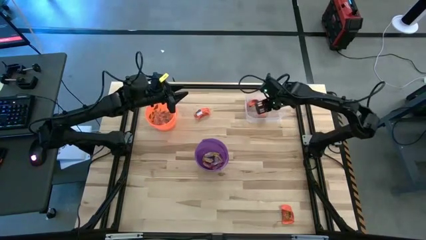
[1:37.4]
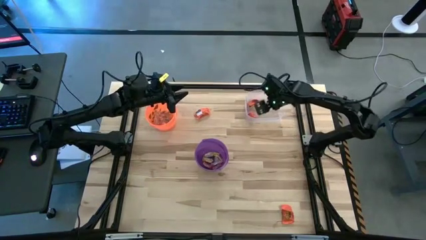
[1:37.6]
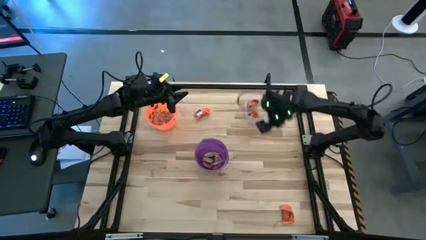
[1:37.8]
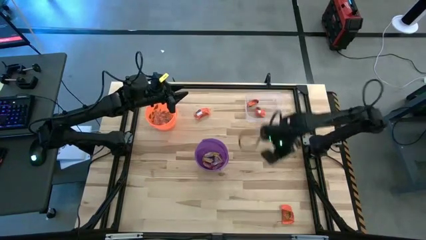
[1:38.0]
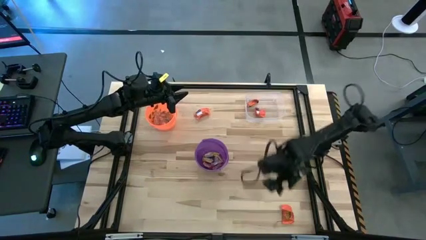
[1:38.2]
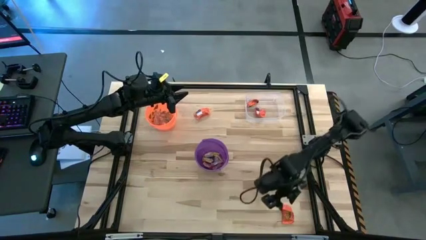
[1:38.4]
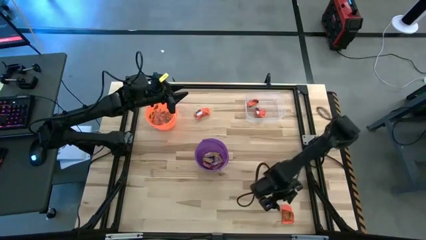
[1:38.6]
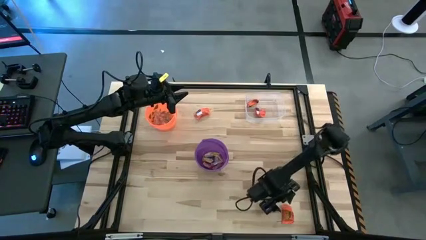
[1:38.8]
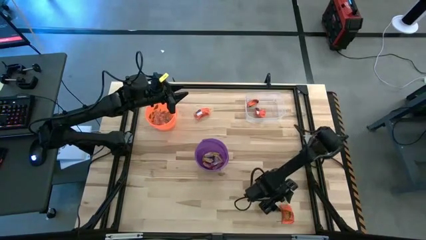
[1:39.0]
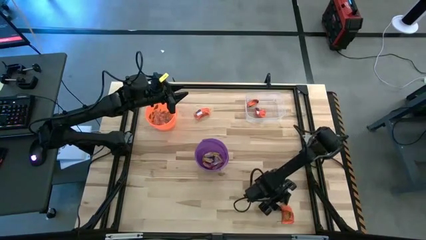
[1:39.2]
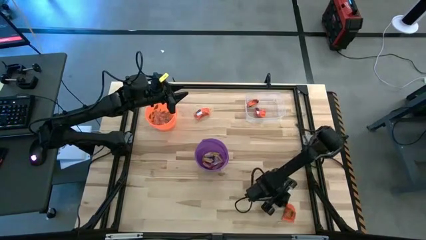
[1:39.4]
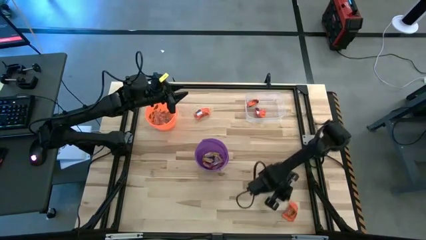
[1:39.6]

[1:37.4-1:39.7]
Task: Sort candy by brand, put in halloween buckets
Put the orange chocolate into the transparent bin

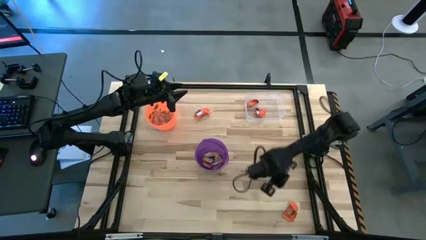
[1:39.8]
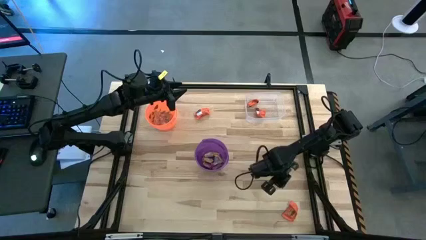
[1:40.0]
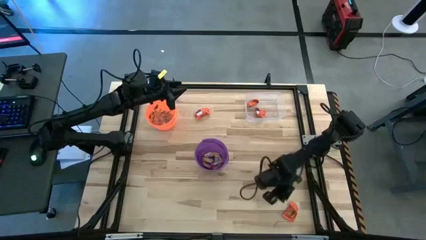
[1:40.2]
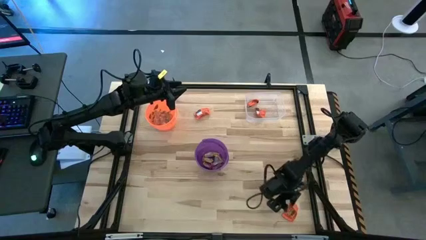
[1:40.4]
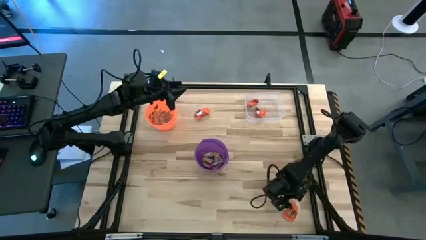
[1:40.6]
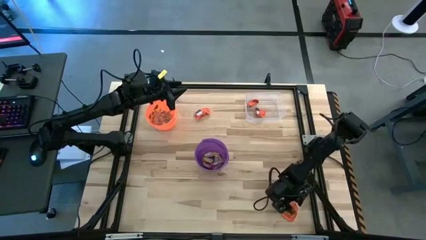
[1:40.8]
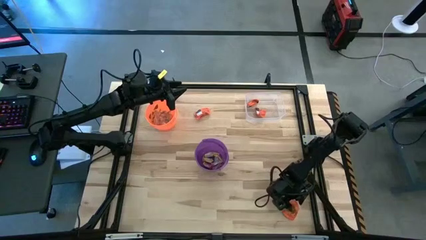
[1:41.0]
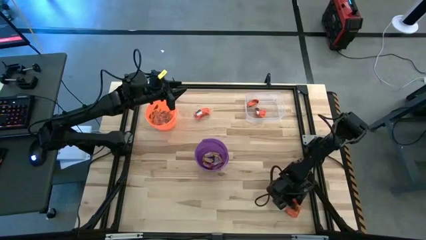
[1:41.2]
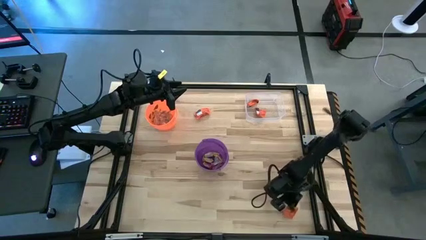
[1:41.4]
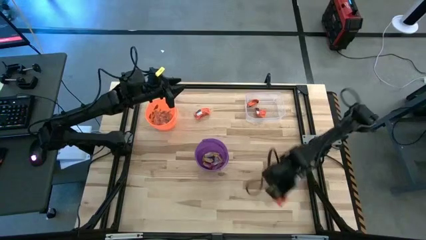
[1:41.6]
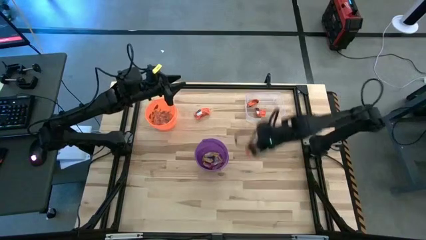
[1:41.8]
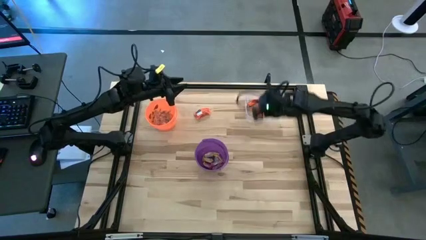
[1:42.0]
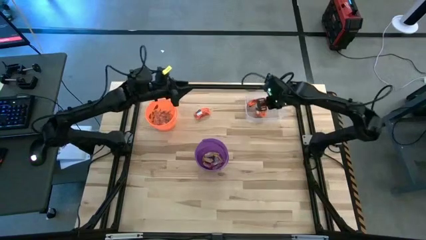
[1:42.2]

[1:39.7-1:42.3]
Put the orange chocolate into the transparent bin

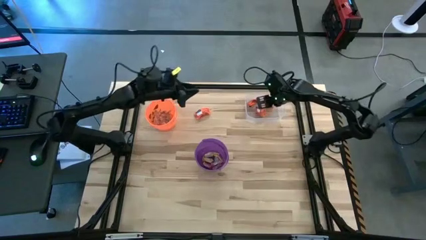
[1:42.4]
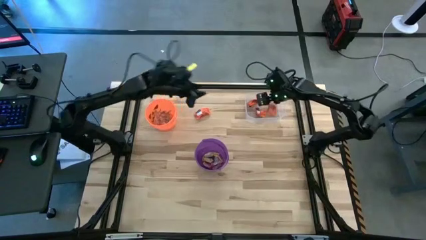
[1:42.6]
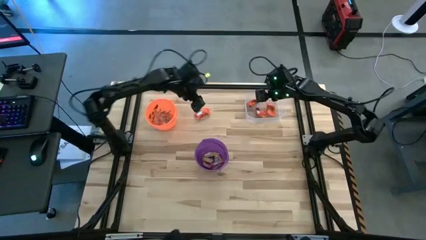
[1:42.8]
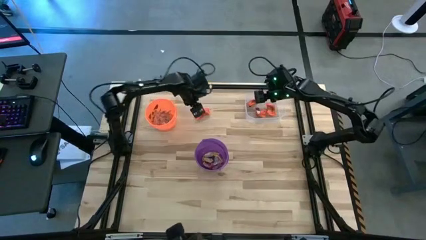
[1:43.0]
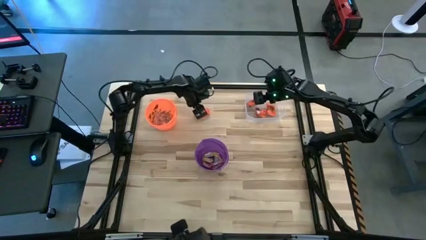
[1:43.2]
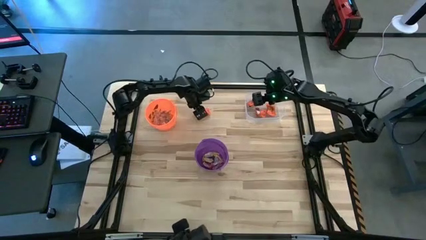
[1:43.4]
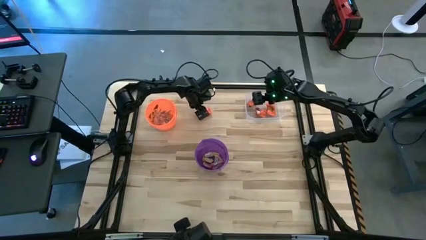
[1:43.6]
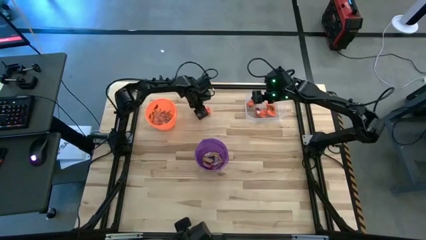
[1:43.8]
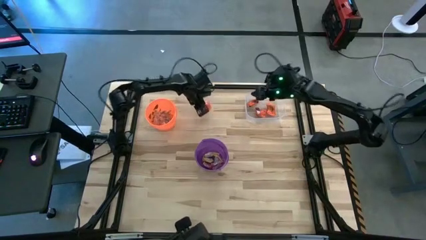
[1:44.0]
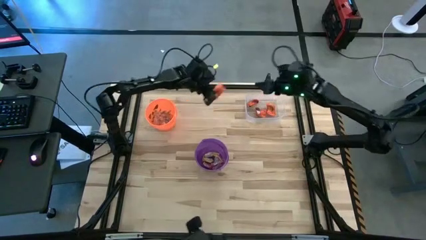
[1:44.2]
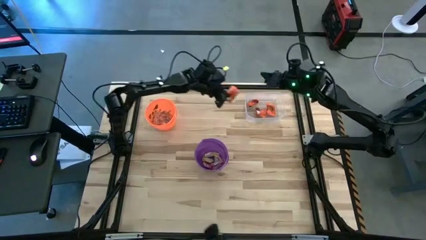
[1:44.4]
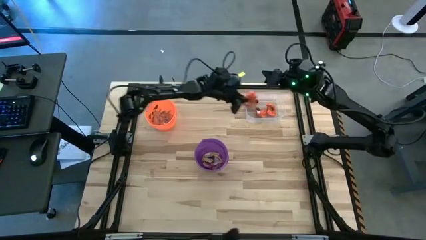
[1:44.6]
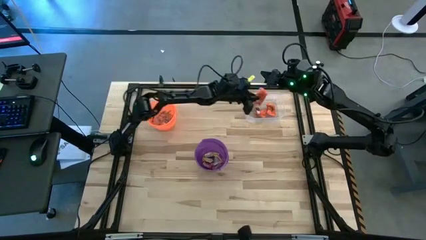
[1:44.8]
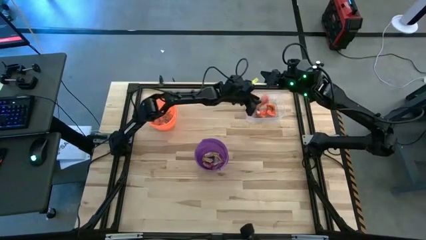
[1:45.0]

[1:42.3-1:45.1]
Put the orange chocolate into the transparent bin

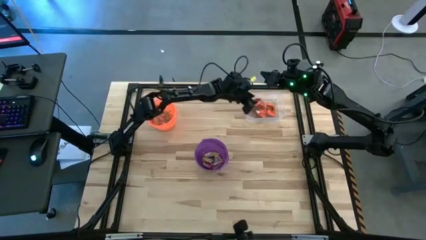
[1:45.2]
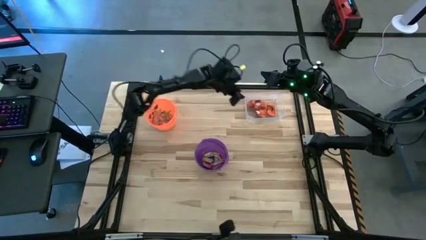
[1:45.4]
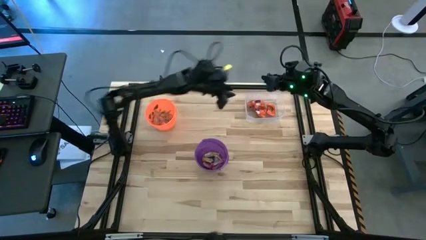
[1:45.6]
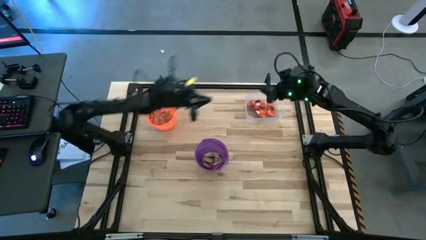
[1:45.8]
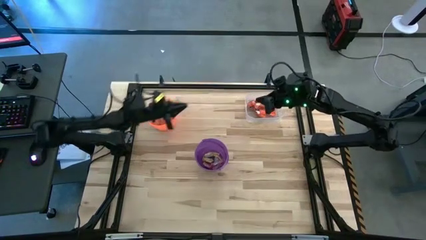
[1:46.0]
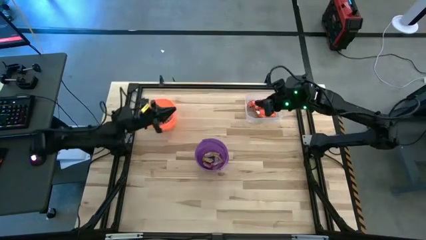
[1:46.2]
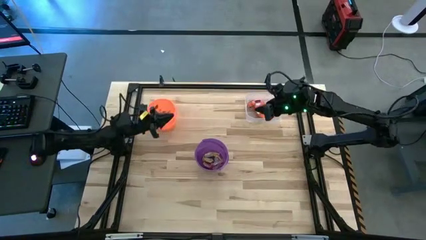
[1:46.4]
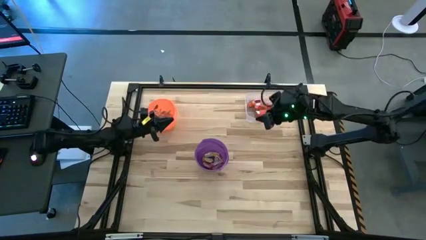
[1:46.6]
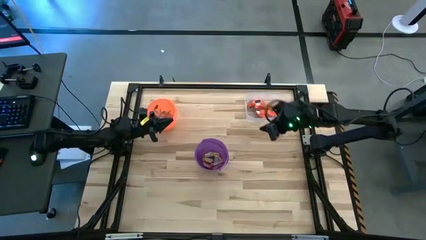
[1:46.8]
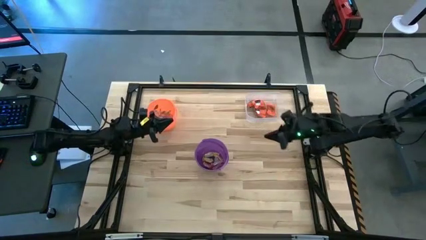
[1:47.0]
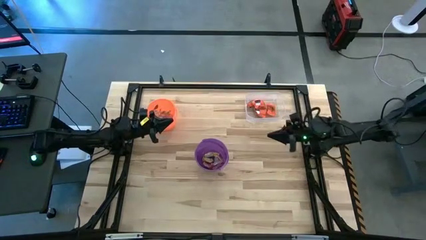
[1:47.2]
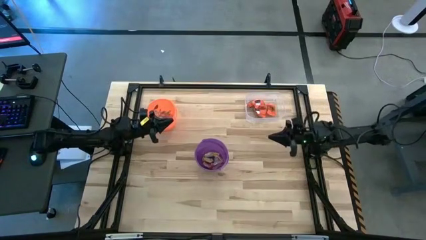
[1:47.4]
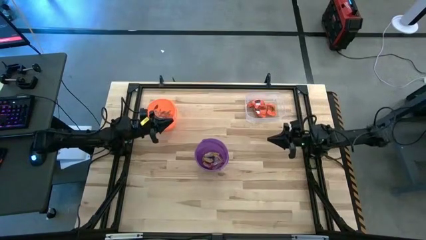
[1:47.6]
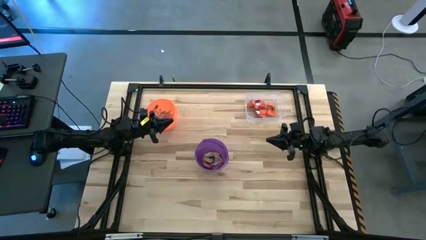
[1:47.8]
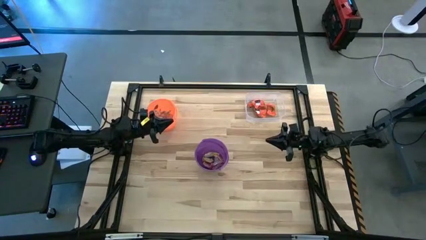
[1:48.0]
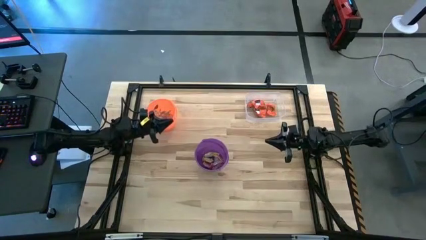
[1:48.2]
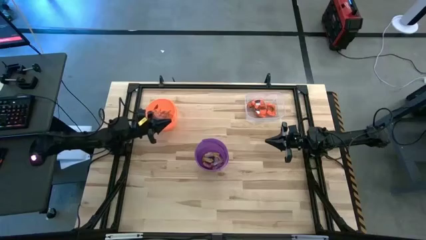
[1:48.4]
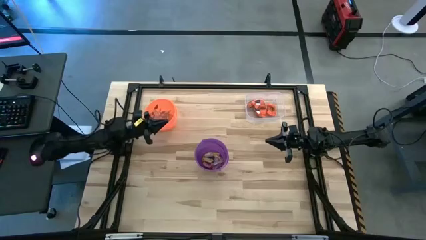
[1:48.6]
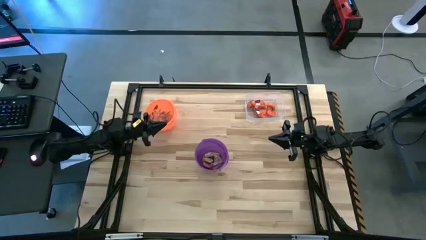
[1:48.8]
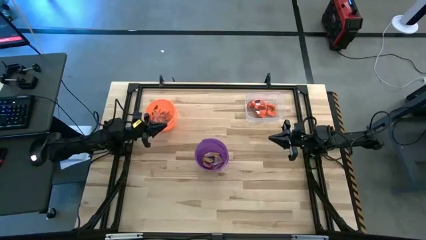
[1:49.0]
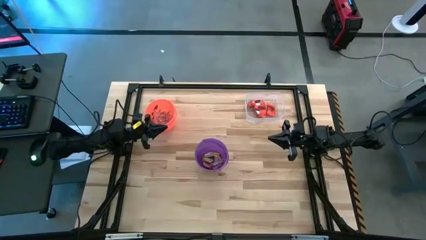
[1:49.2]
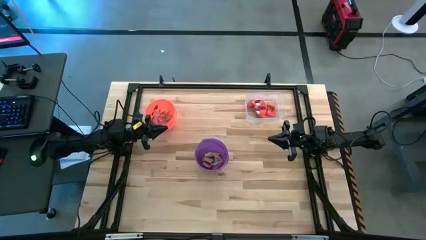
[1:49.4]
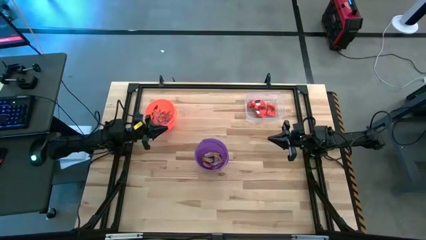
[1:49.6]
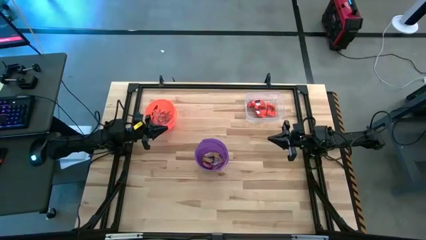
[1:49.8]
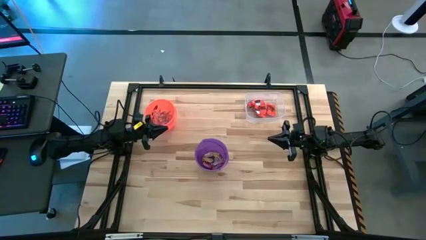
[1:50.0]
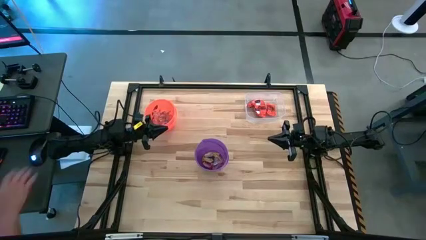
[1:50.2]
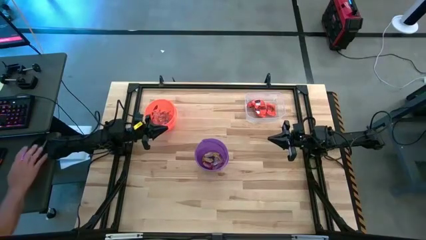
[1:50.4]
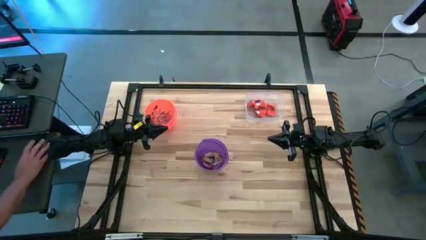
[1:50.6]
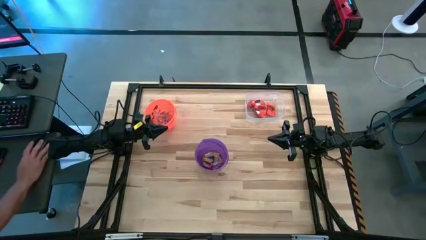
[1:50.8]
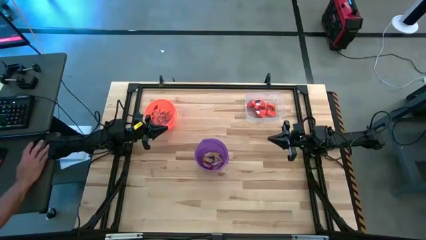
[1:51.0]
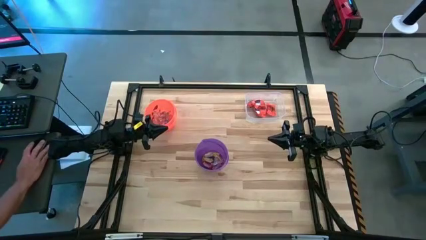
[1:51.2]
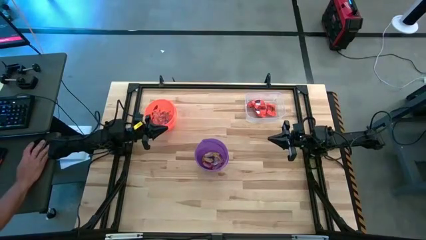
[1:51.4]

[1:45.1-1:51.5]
Return to Home Position

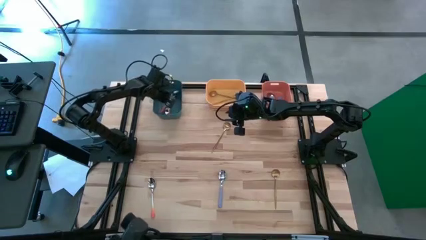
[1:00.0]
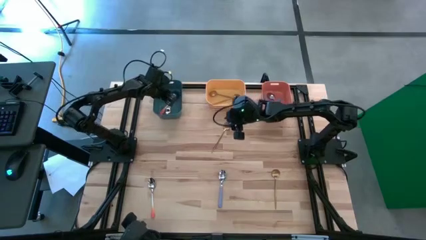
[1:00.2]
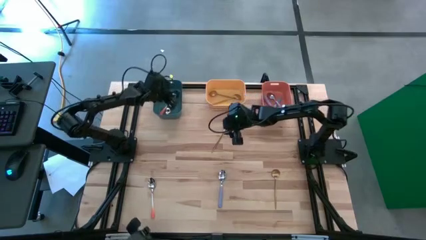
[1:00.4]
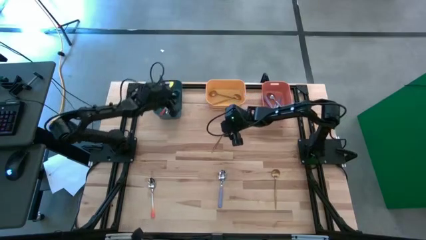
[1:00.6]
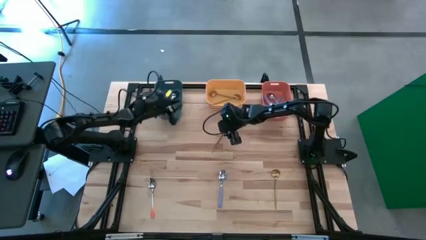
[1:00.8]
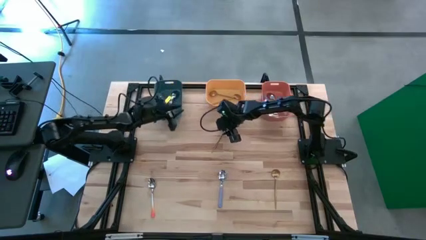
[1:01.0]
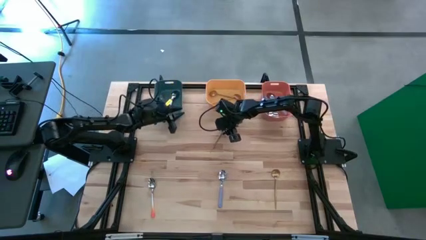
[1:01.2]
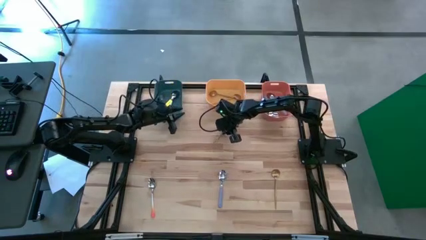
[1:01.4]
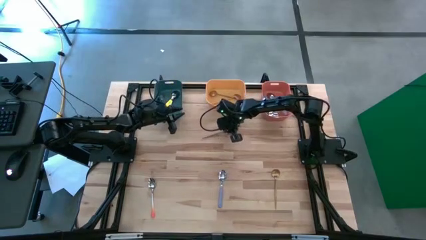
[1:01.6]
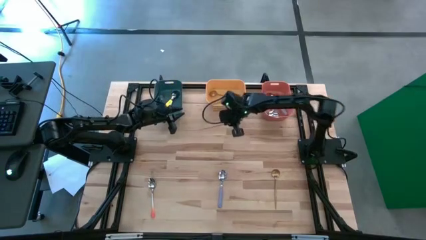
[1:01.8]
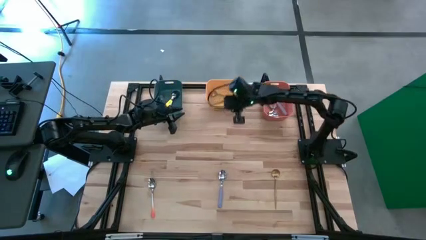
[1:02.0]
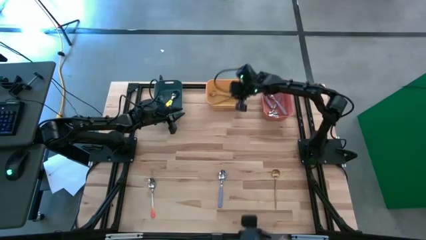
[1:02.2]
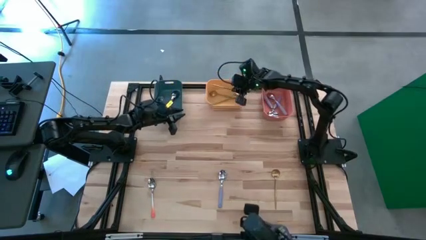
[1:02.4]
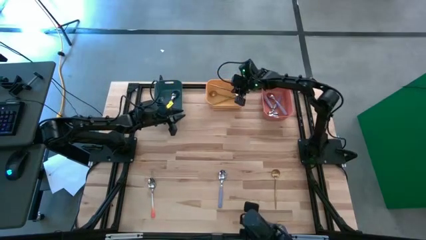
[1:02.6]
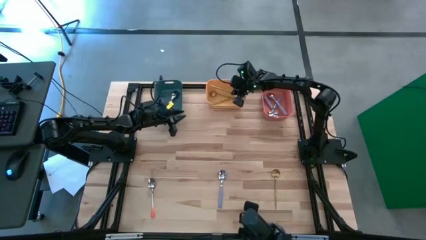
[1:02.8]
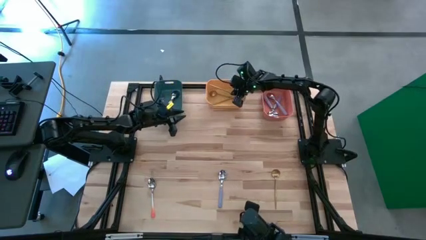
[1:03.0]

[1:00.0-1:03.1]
Task: Sort silverware by color (type)
Put the top gold spoon into the yellow bin
